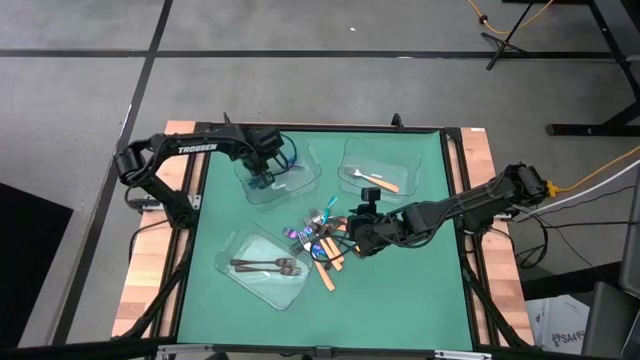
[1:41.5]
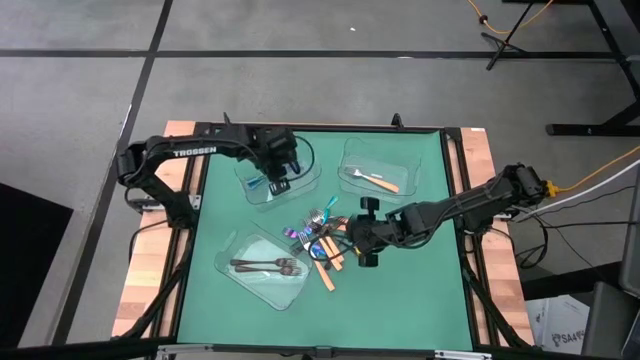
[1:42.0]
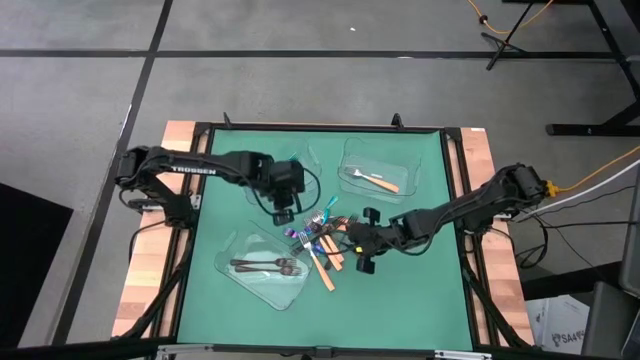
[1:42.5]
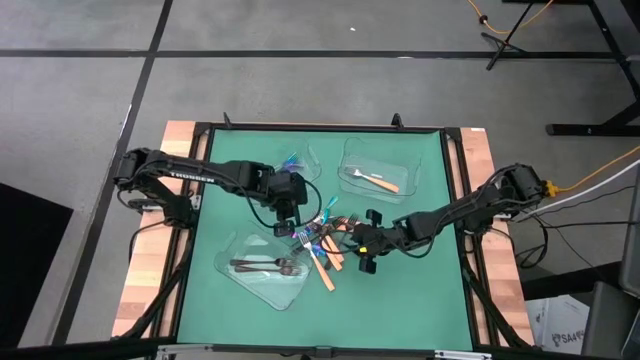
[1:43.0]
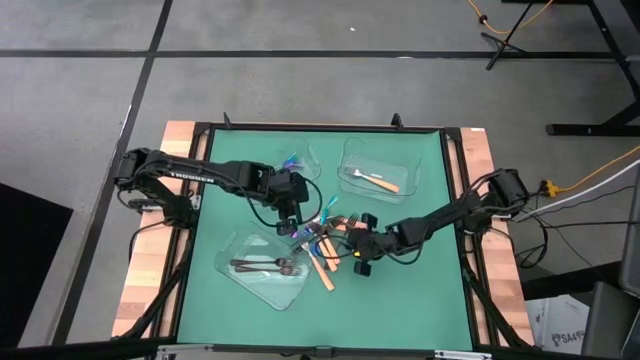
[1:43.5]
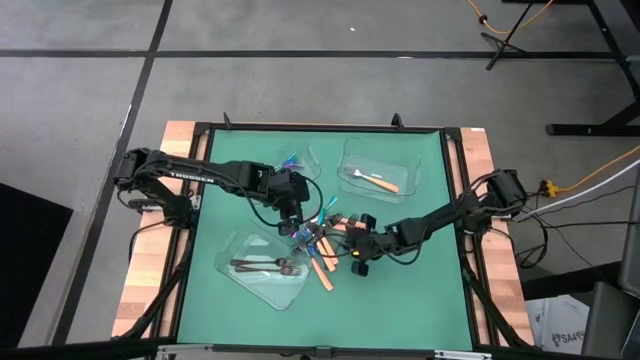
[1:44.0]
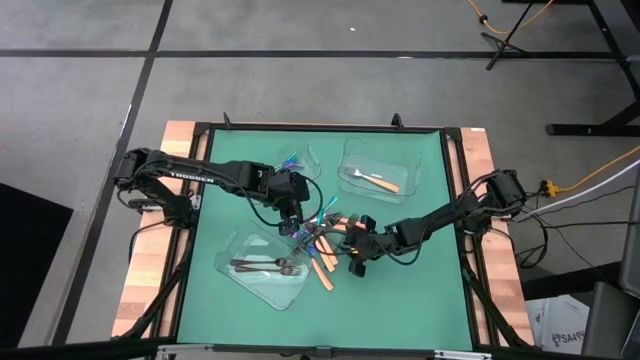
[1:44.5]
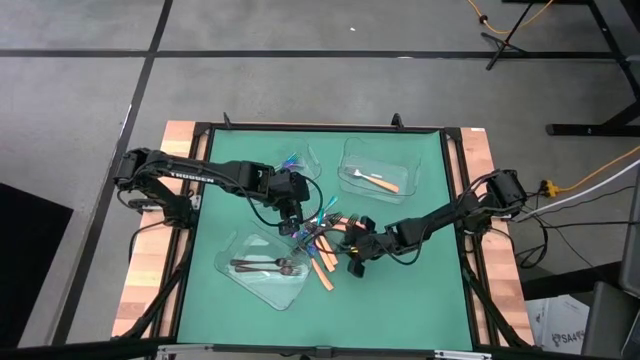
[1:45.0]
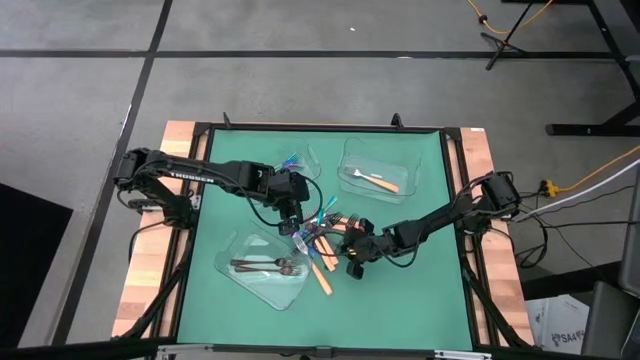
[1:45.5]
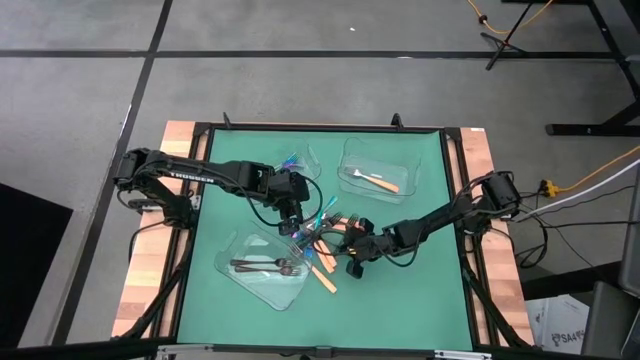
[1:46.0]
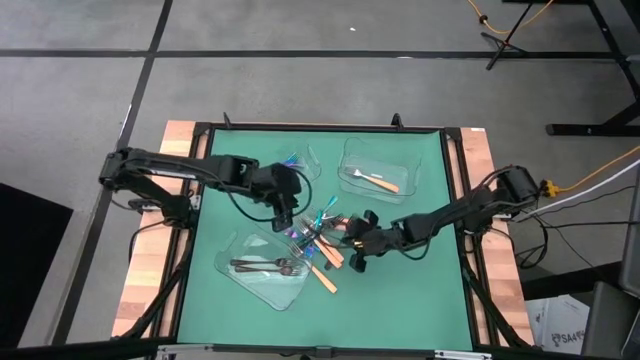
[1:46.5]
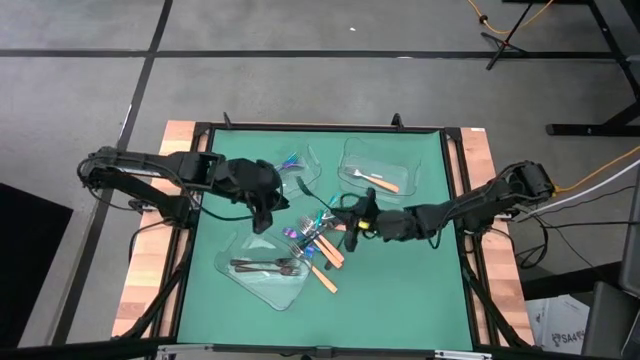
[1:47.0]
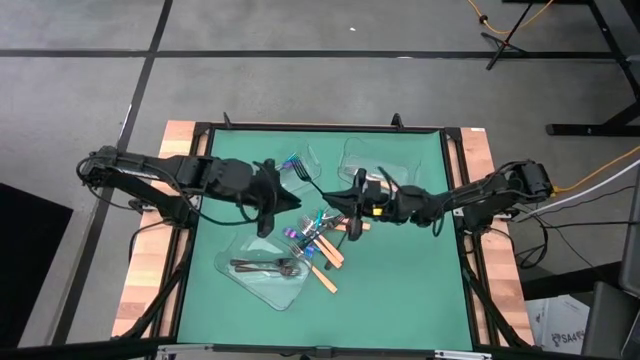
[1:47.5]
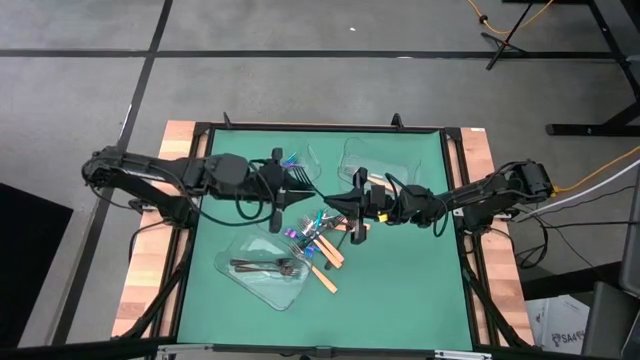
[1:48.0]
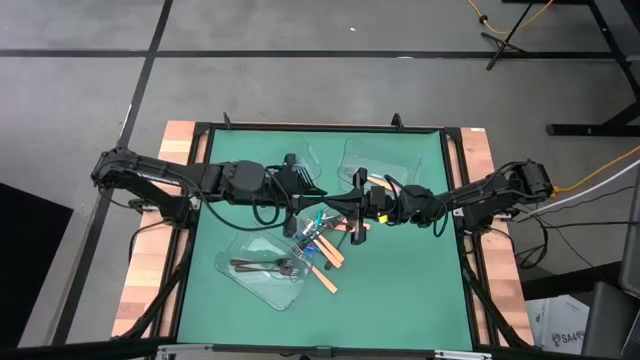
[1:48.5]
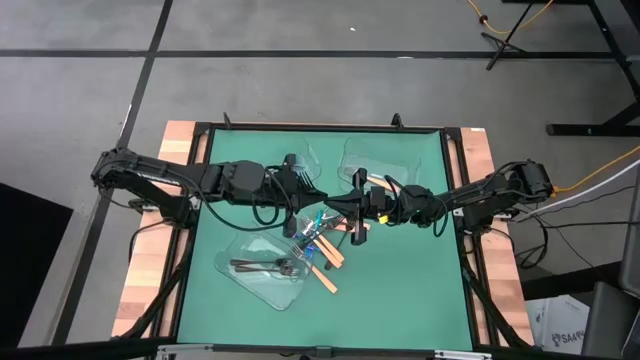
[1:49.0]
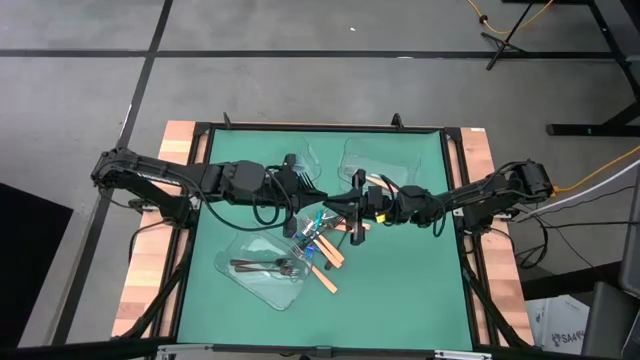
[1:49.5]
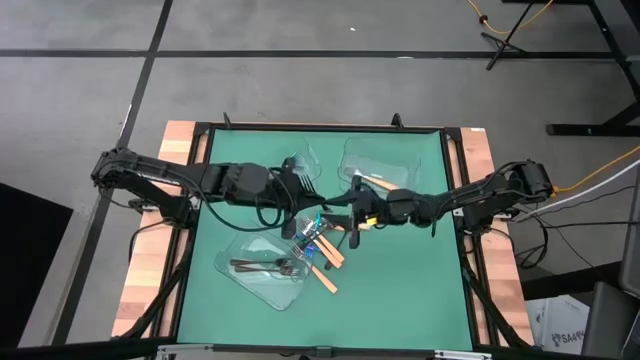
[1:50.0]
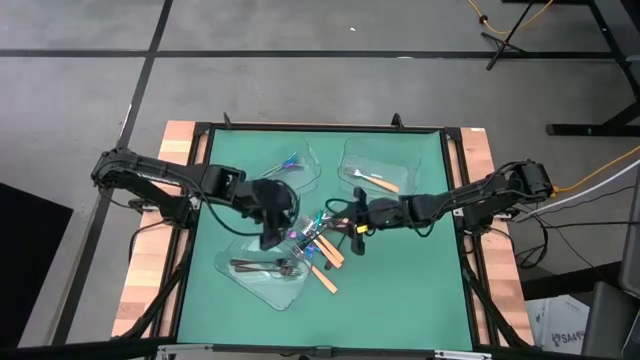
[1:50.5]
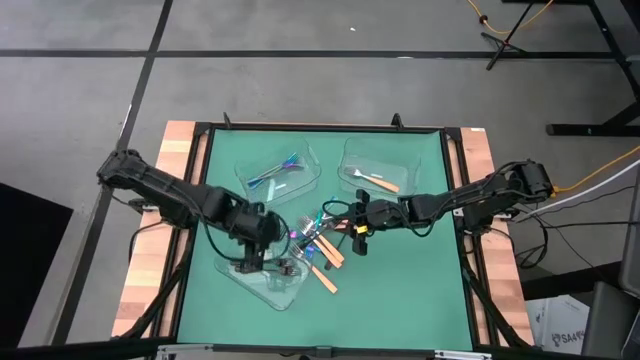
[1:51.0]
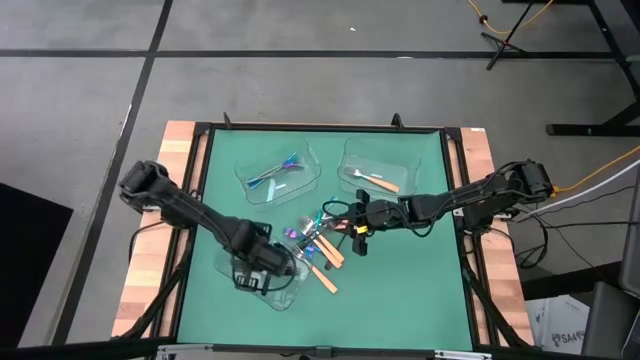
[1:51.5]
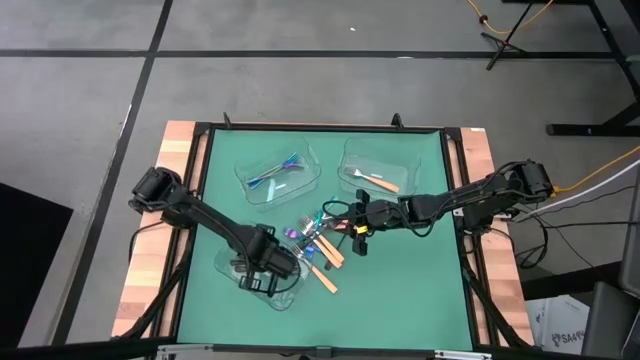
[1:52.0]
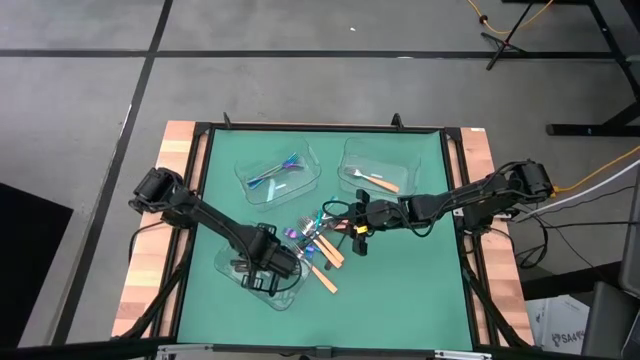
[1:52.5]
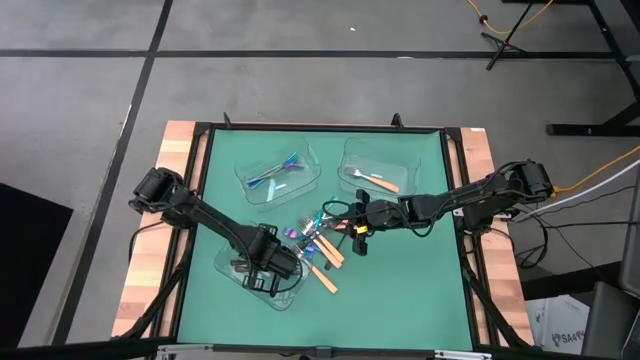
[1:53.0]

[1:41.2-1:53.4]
Task: Sort silverware by color (type)
Put the black fork into the bottom transparent bin

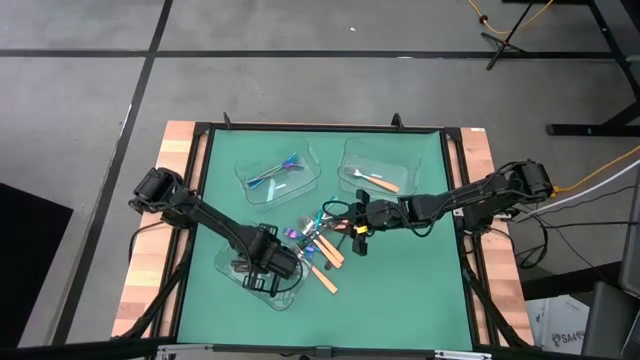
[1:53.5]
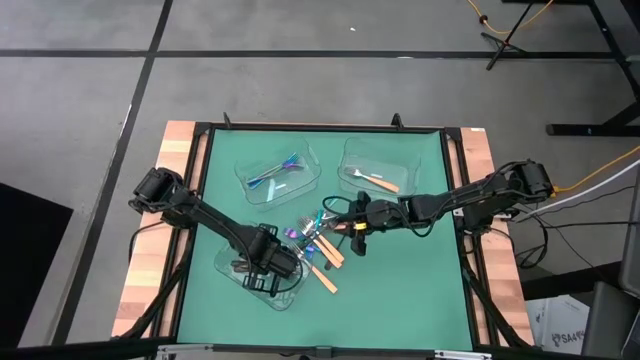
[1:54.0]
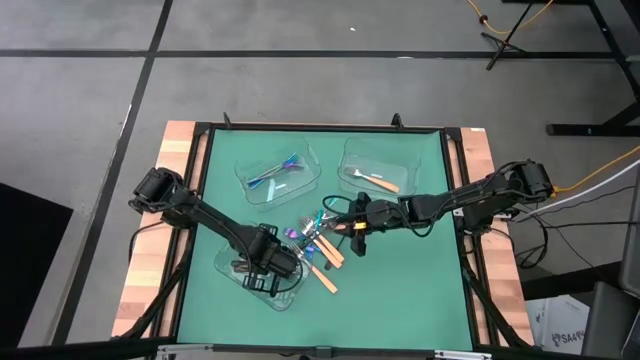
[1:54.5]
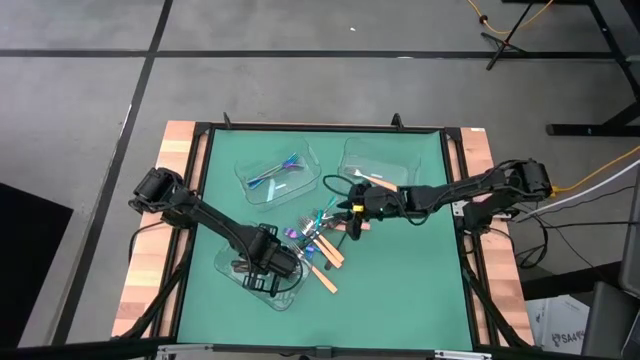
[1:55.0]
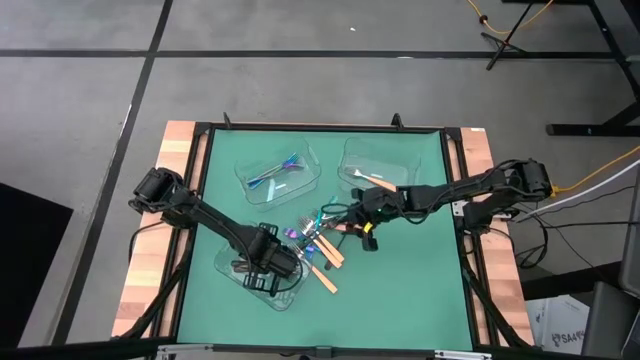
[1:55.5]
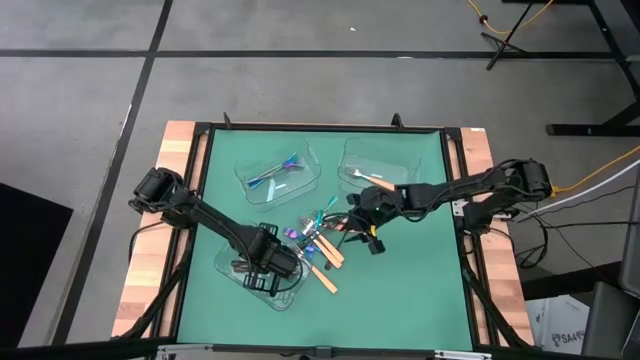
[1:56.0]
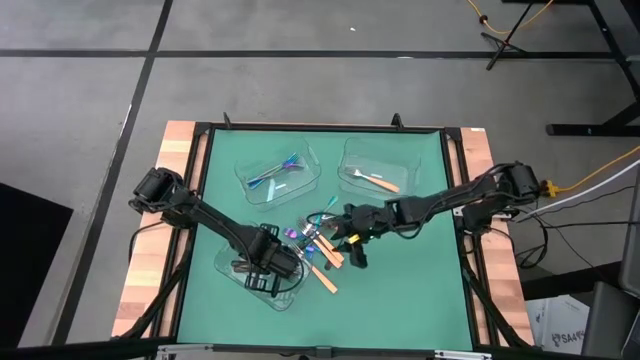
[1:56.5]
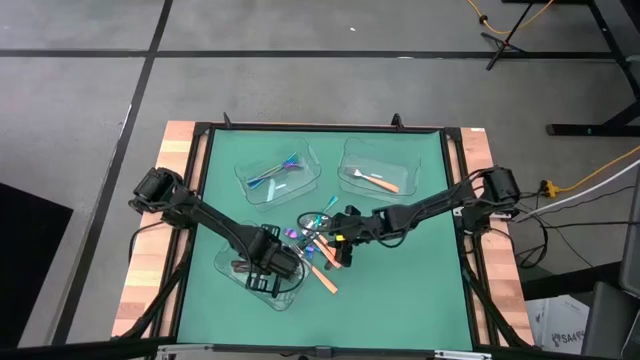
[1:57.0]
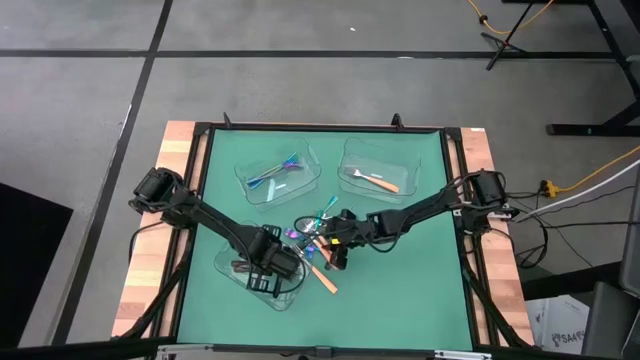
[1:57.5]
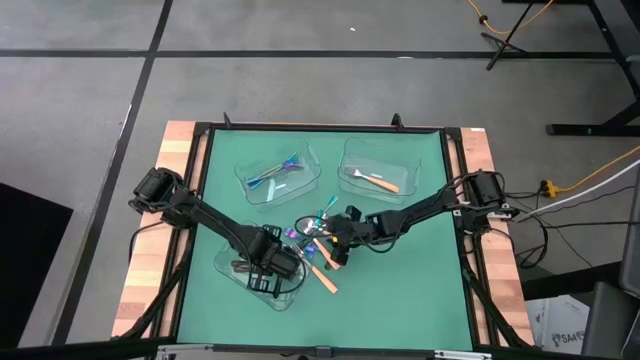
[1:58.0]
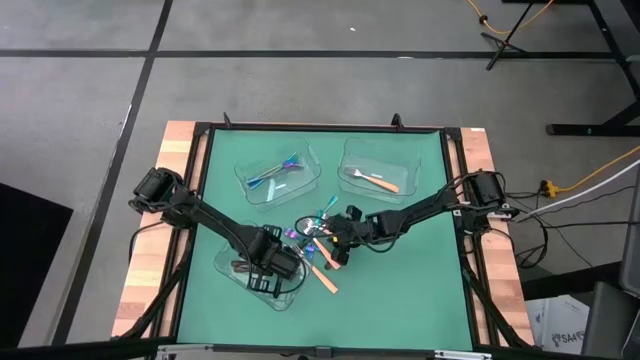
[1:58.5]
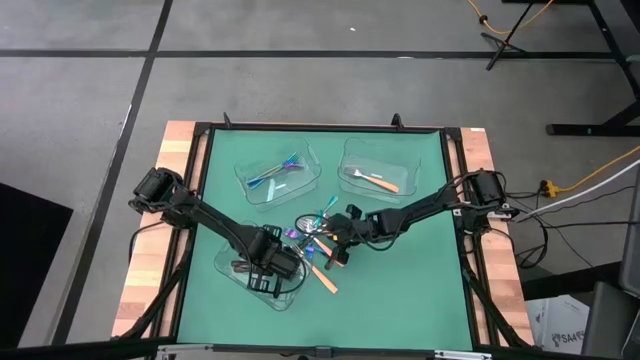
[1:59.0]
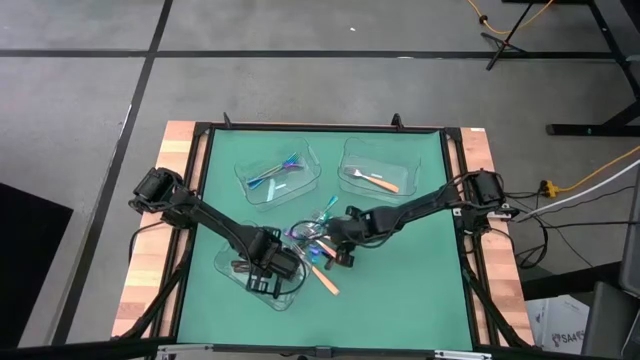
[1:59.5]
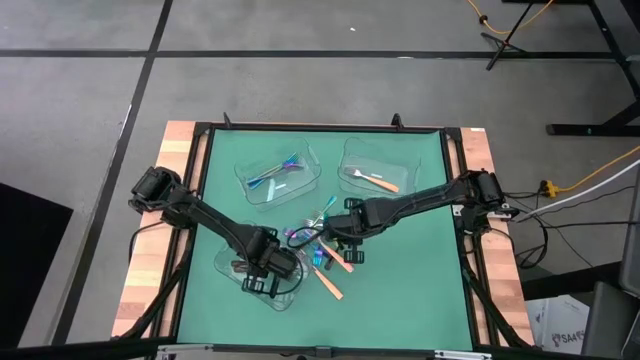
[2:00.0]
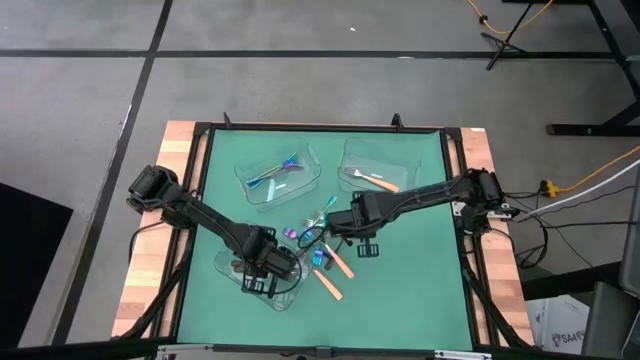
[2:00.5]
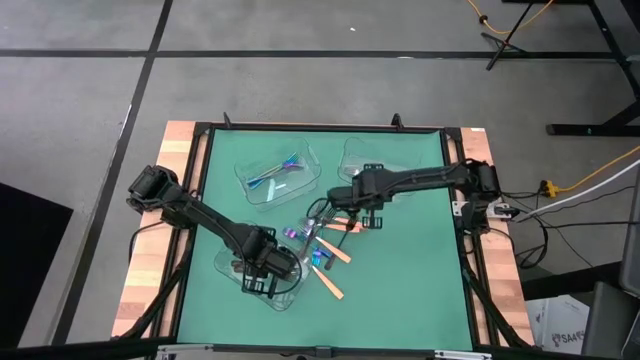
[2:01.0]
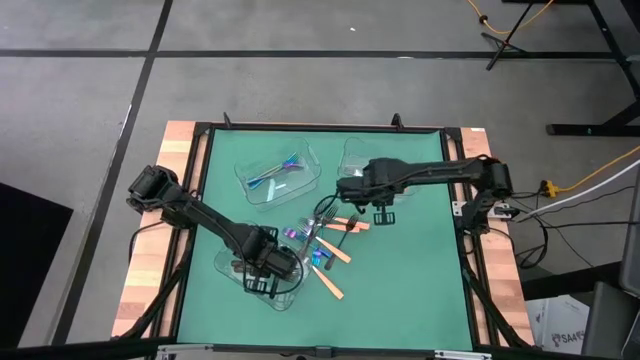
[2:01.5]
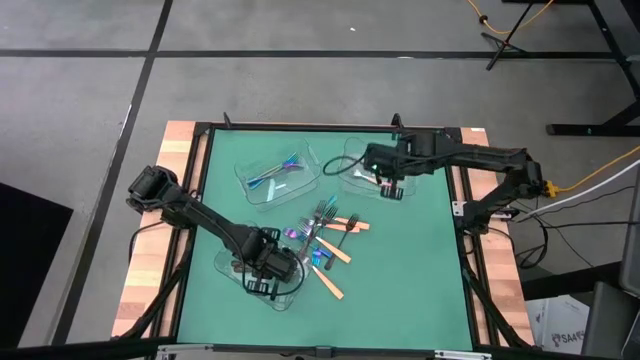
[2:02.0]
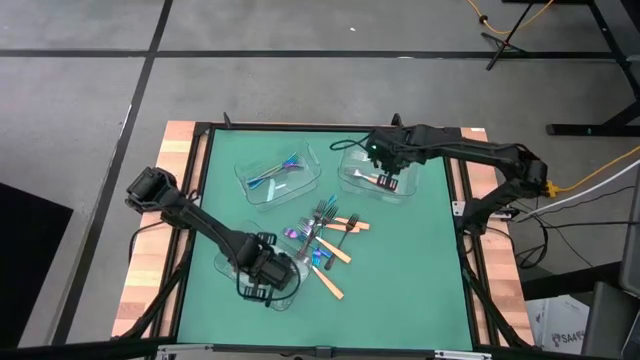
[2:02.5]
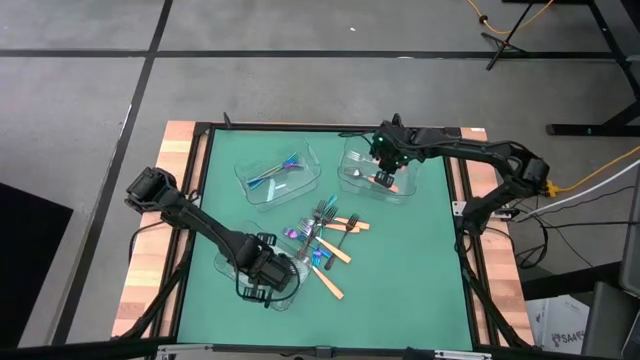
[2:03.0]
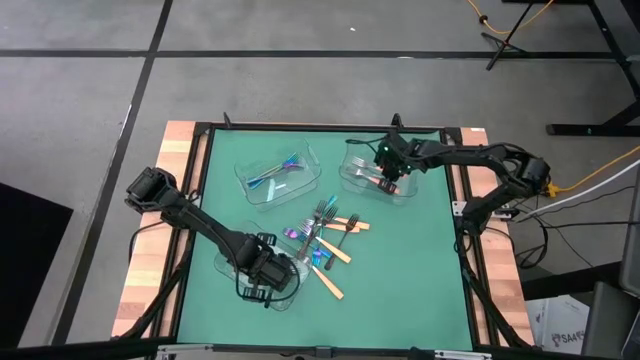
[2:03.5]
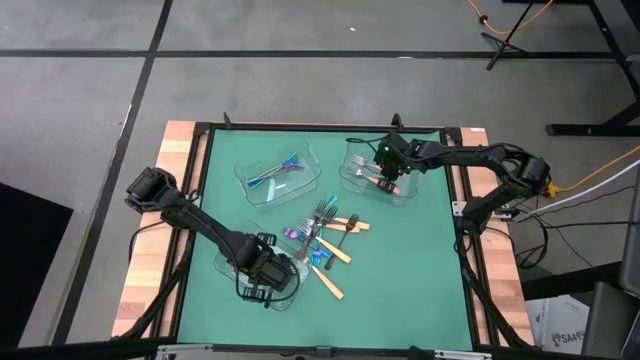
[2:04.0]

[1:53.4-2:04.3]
Put the yellow fork into the top right transparent bin
